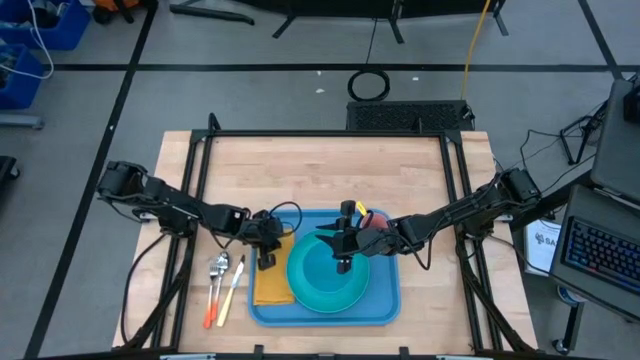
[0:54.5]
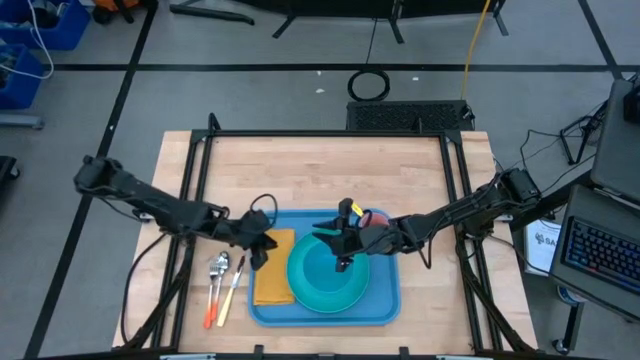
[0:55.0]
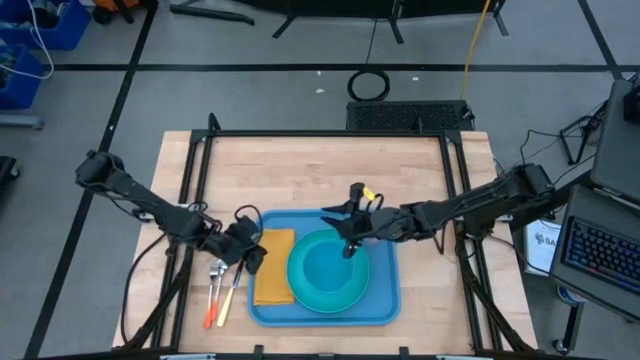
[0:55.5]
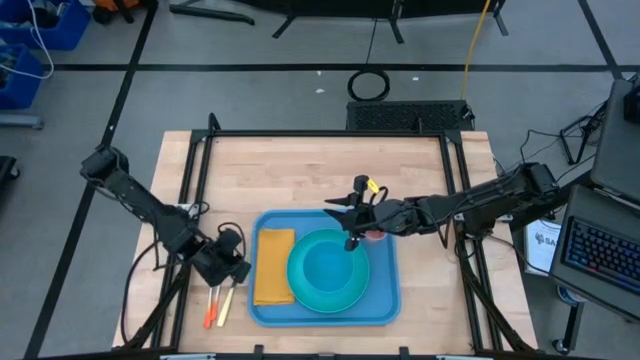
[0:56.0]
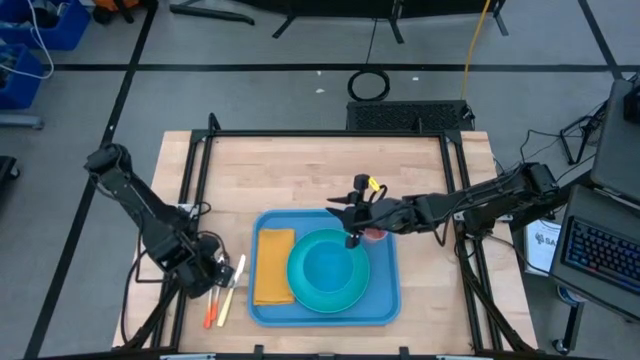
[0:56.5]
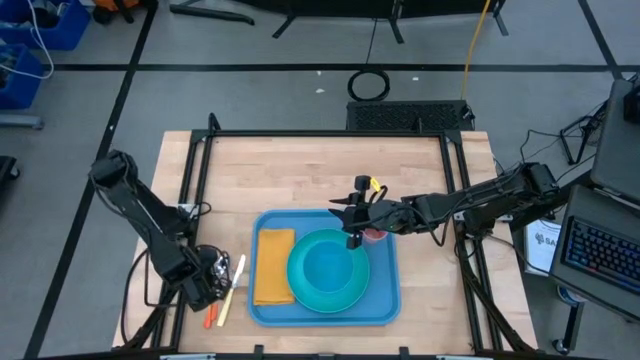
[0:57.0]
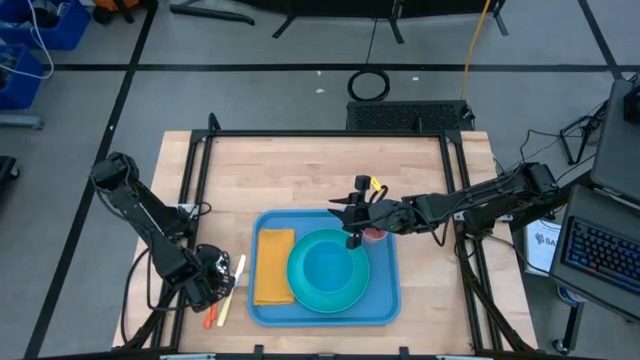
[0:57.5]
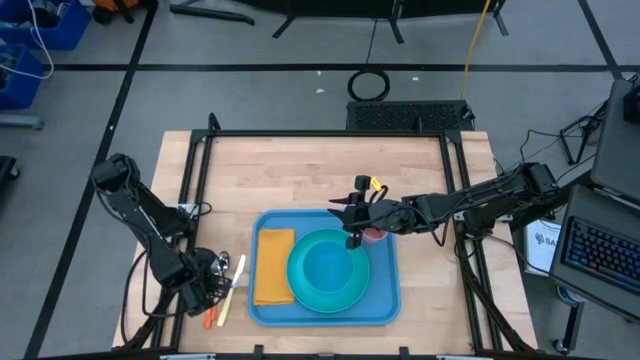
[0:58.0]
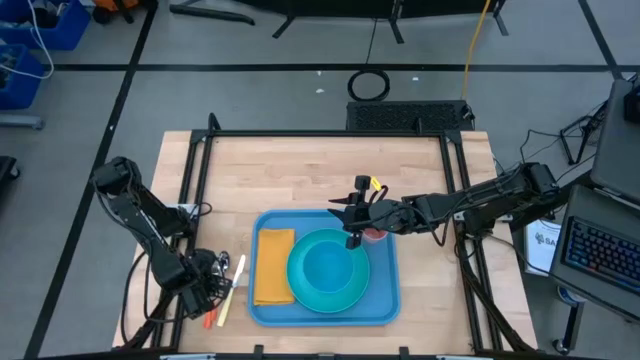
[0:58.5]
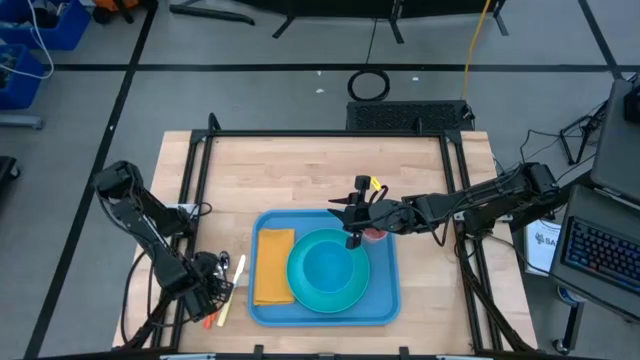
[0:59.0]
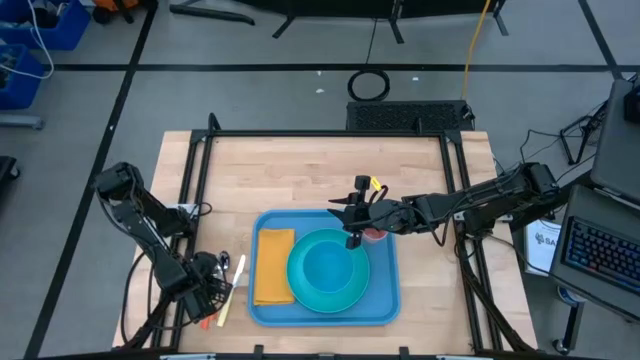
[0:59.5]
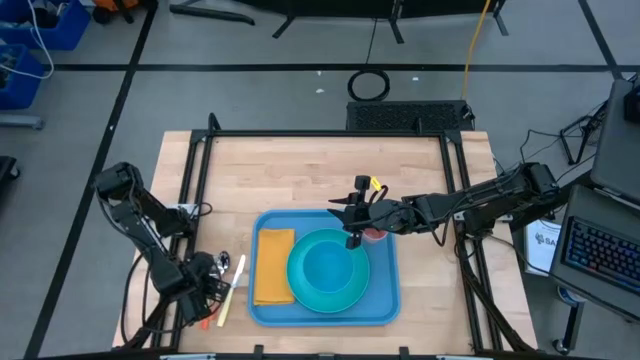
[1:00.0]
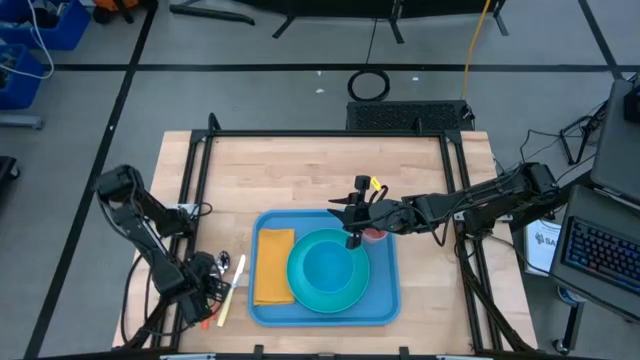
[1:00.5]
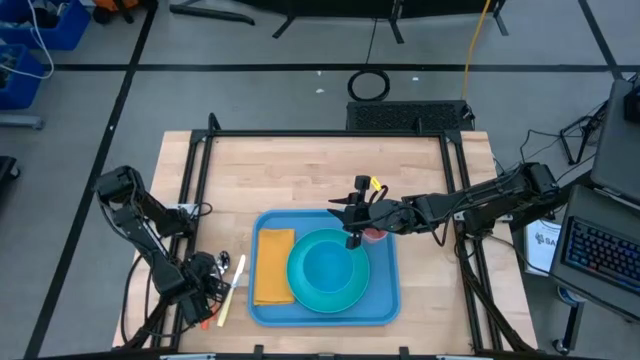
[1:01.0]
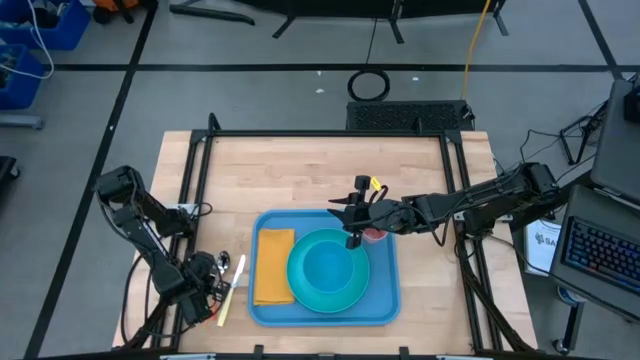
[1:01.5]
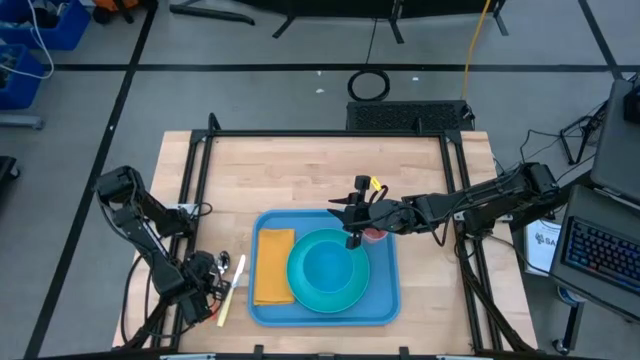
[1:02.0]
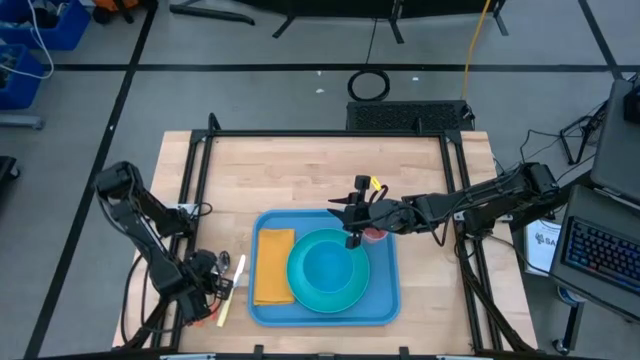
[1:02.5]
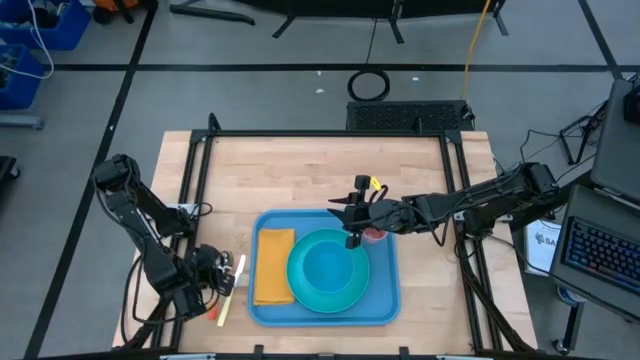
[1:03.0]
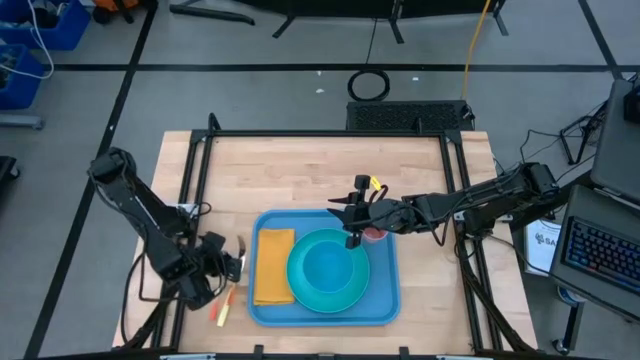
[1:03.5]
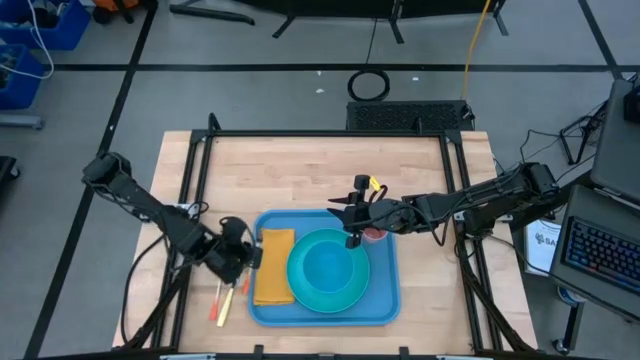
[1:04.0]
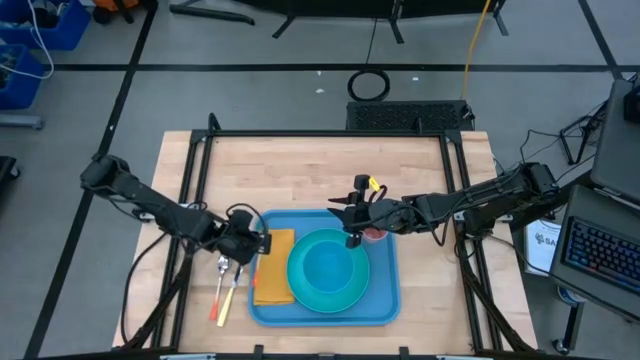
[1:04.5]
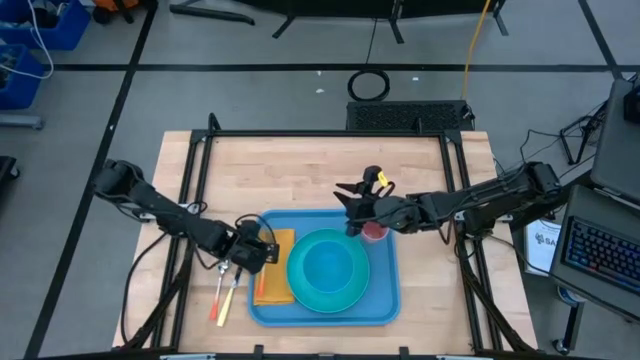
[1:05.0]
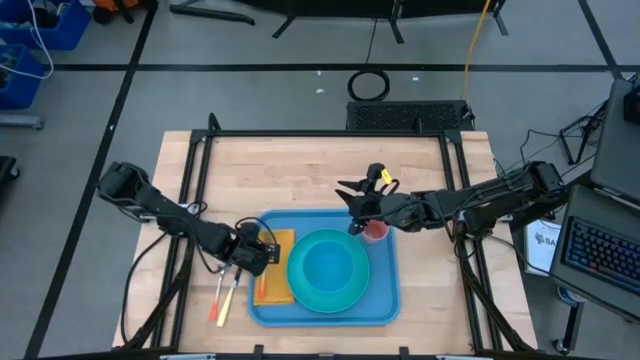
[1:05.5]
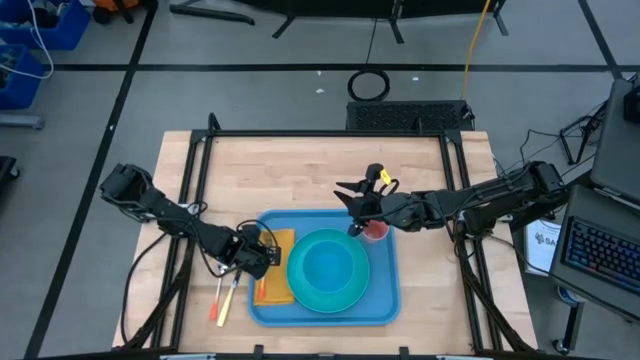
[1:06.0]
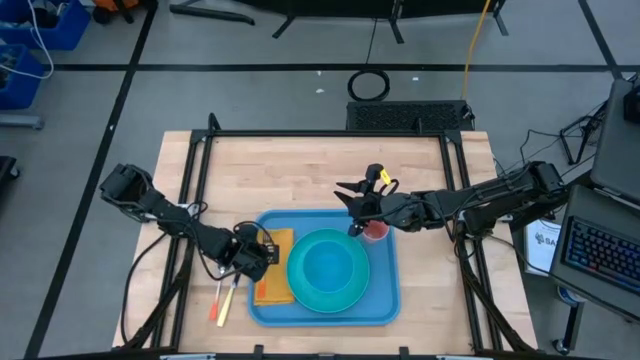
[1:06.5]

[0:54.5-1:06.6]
Task: Set up tray
Put the orange fork on top of the yellow napkin in the blue serving tray

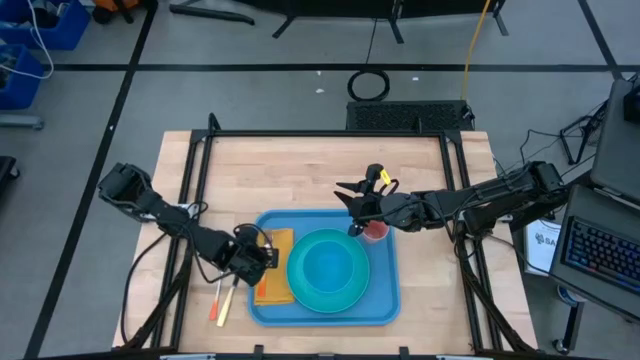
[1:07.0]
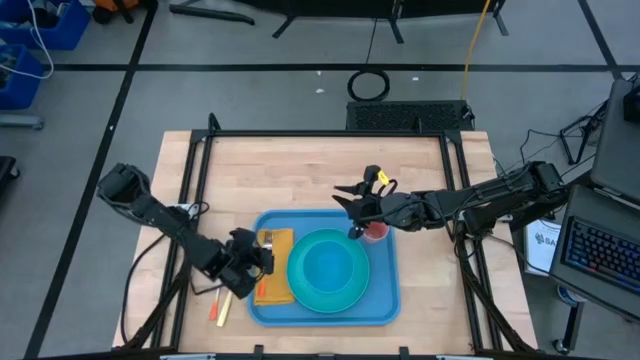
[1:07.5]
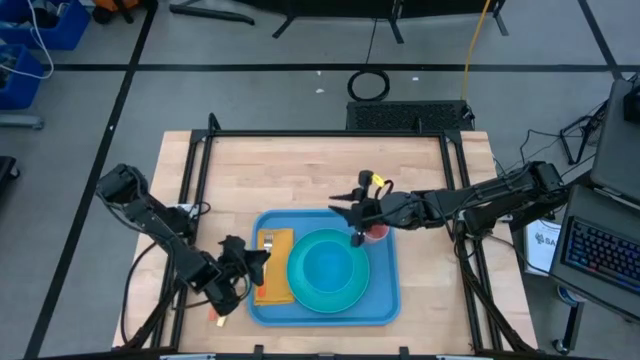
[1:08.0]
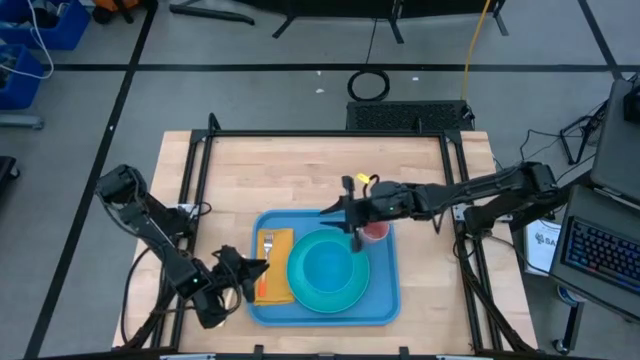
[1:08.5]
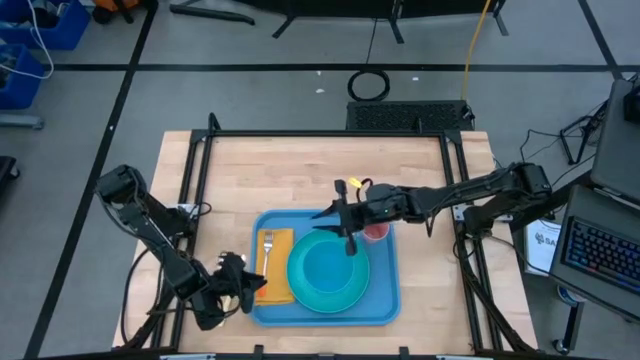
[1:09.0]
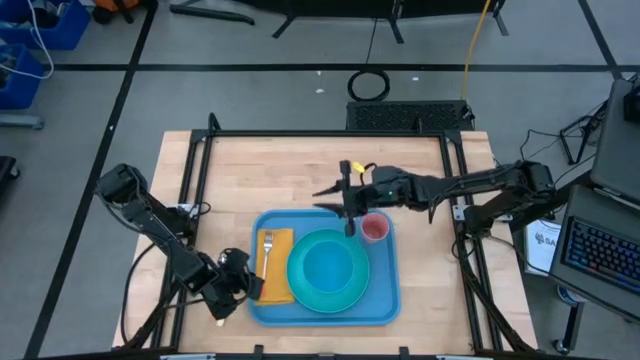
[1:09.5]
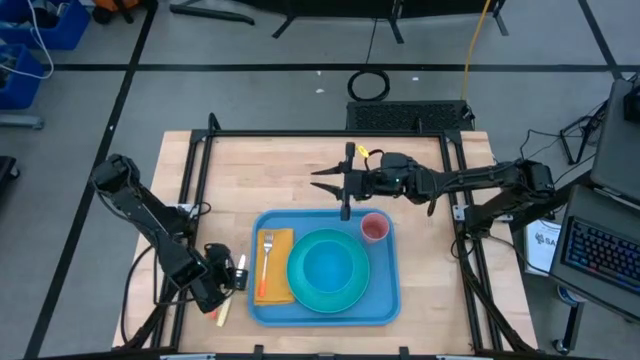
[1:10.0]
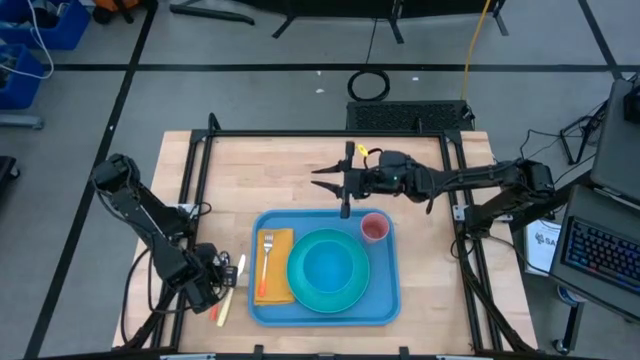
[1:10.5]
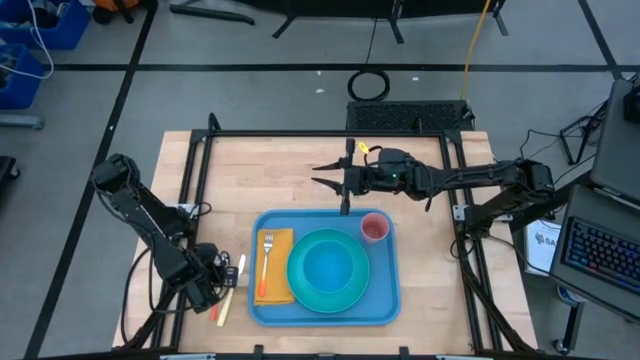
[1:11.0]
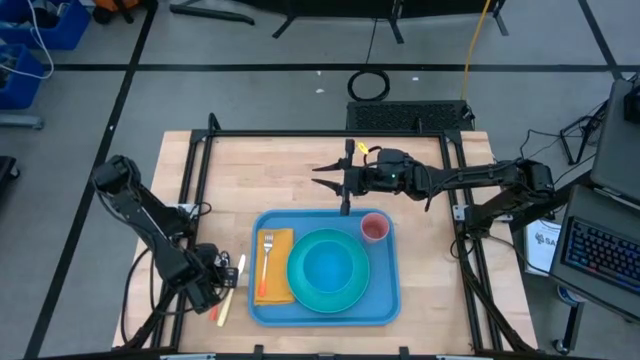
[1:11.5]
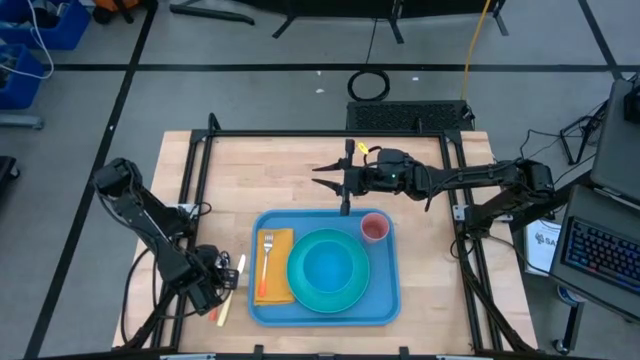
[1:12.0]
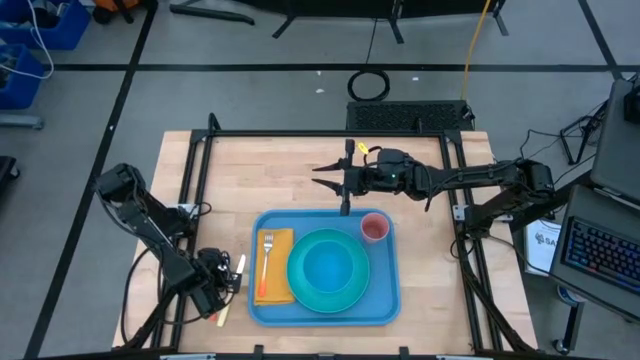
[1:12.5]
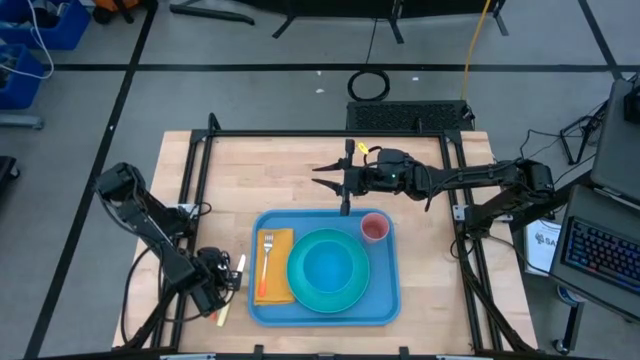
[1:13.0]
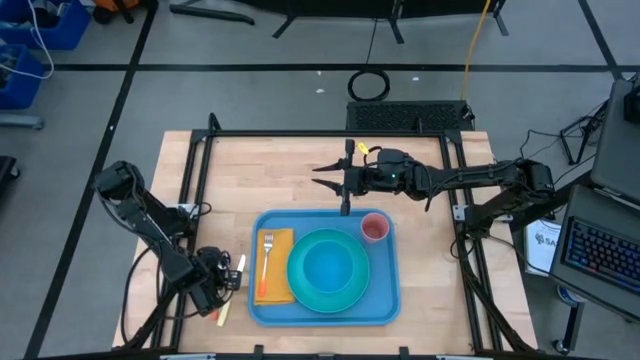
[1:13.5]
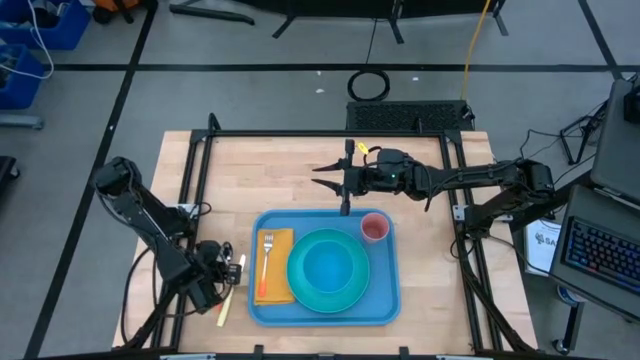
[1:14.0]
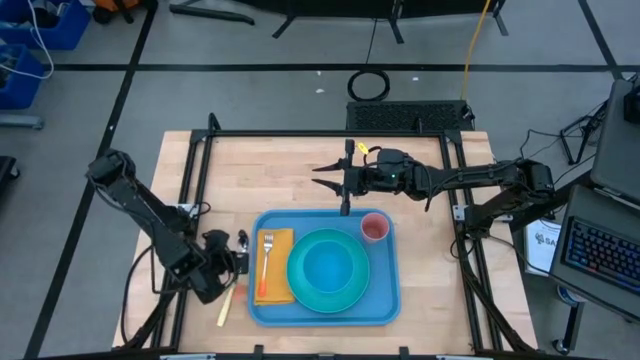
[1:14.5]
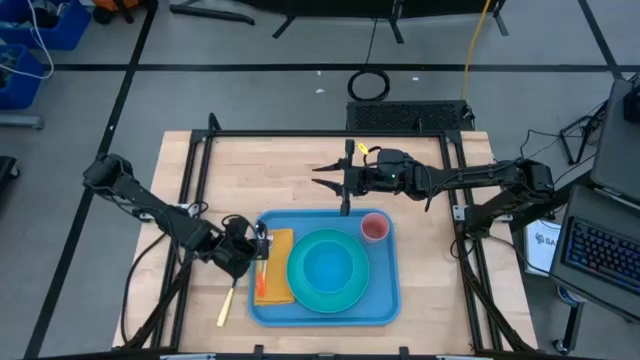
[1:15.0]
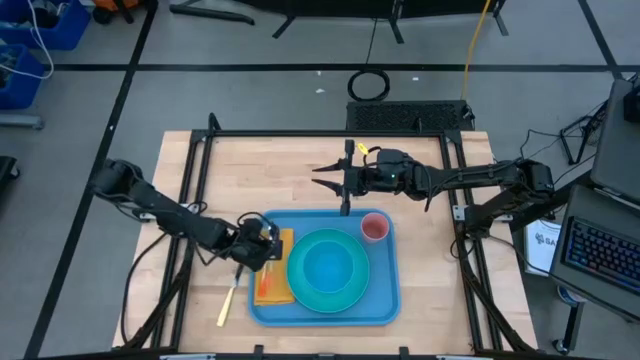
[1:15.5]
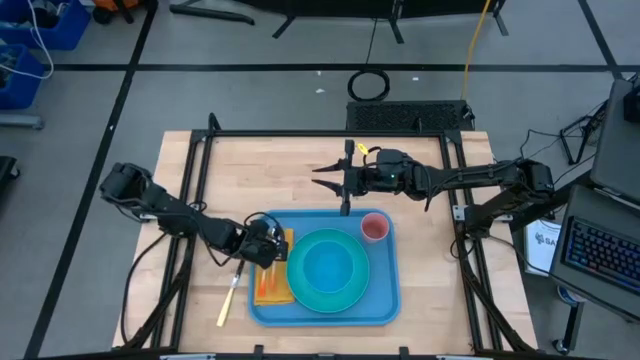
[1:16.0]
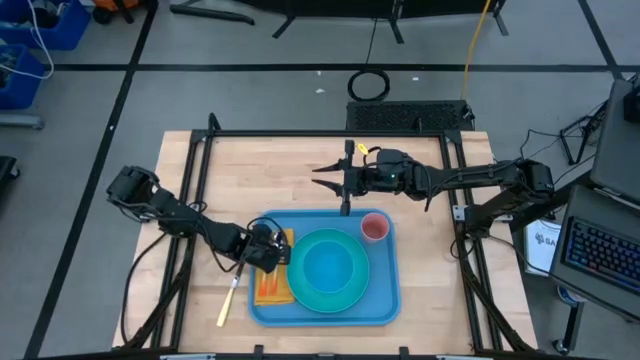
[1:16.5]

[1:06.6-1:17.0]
Put the orange spoon on top of the yellow napkin in the blue serving tray
